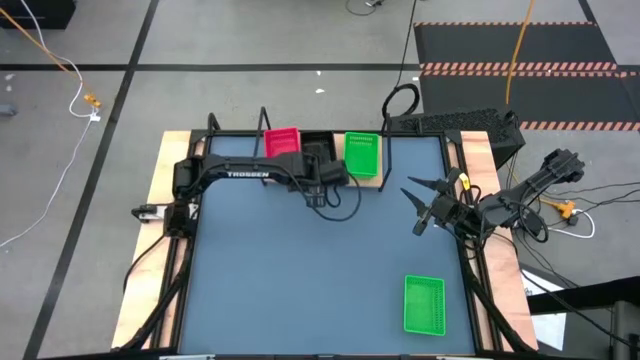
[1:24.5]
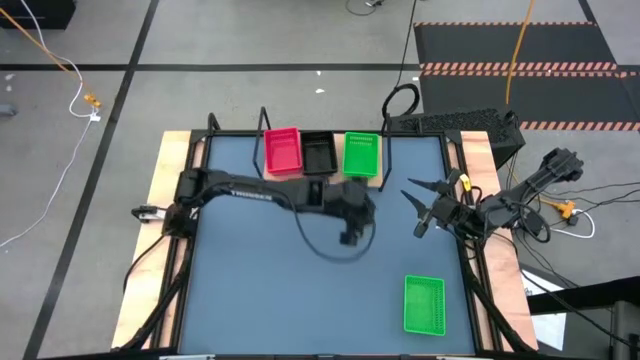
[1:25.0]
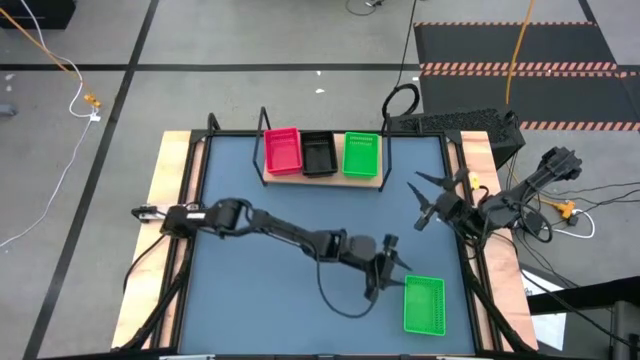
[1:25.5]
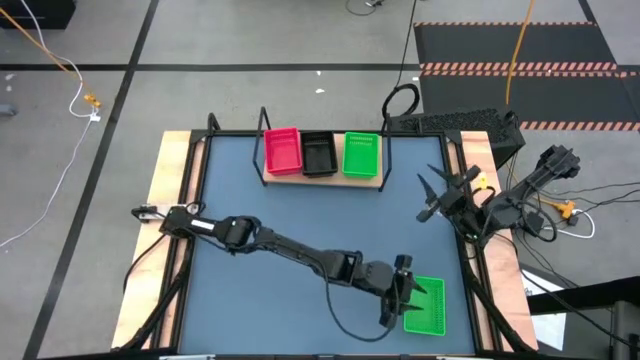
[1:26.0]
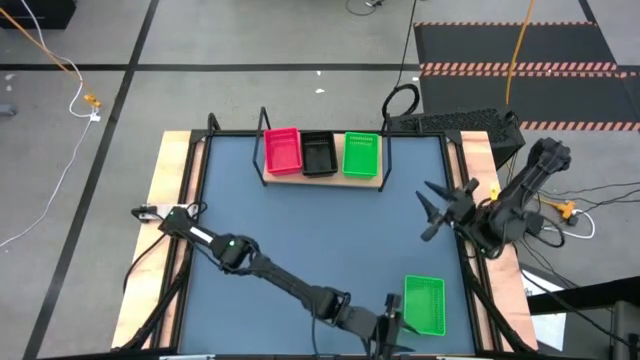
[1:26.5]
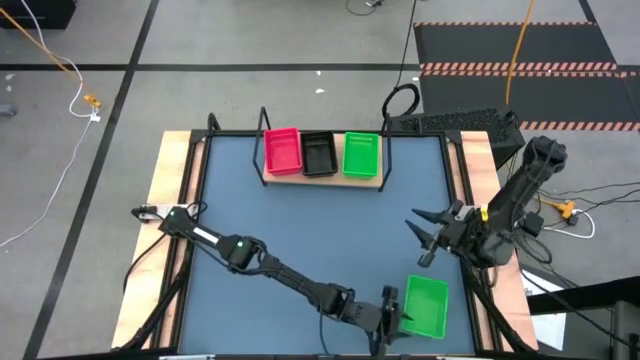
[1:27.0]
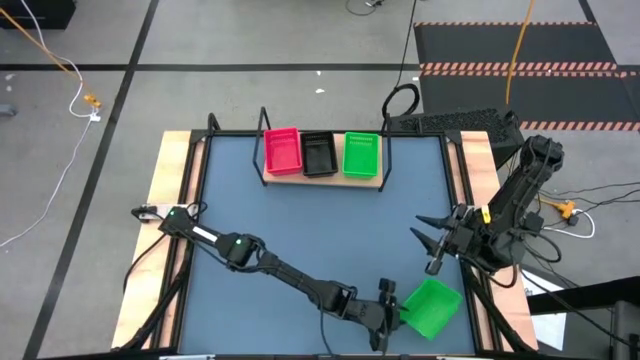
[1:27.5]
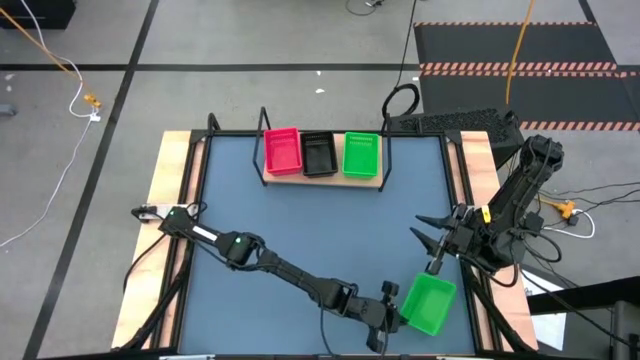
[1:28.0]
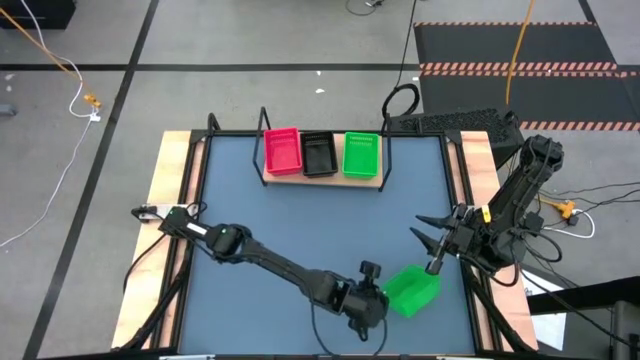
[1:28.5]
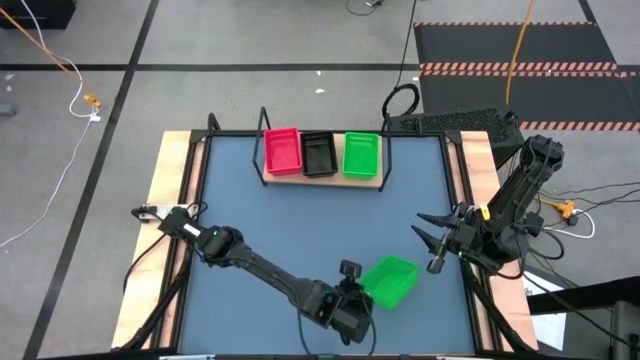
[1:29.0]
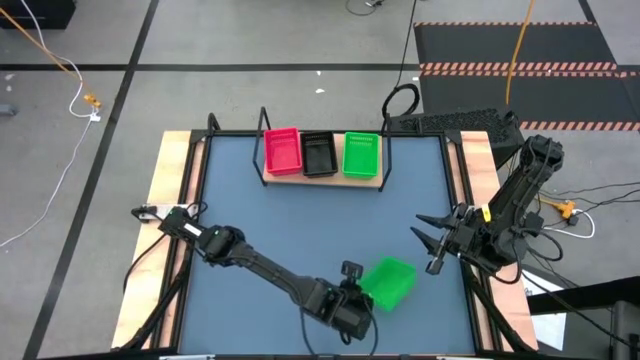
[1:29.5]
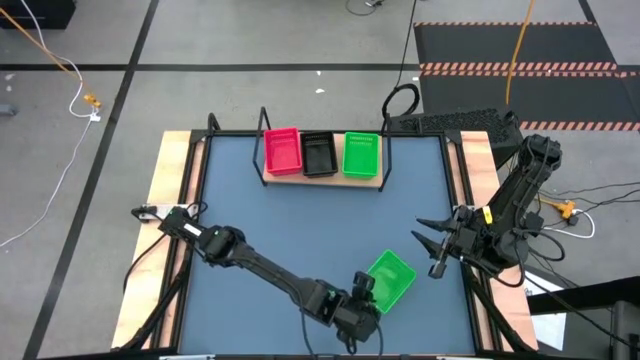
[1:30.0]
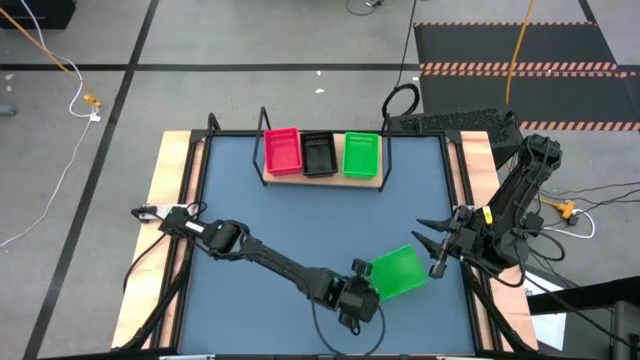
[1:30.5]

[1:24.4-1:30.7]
Task: Stack baskets on shelf by color
Stack the green basket on the stacked green baskets on the shelf

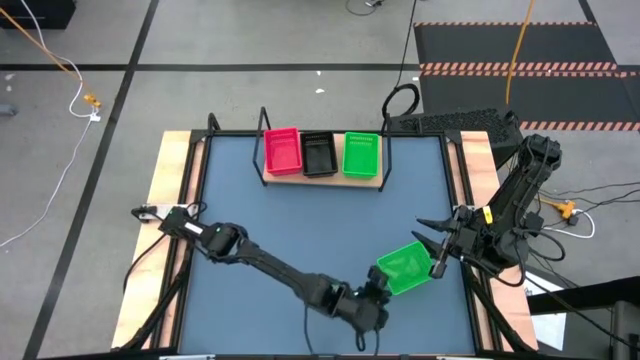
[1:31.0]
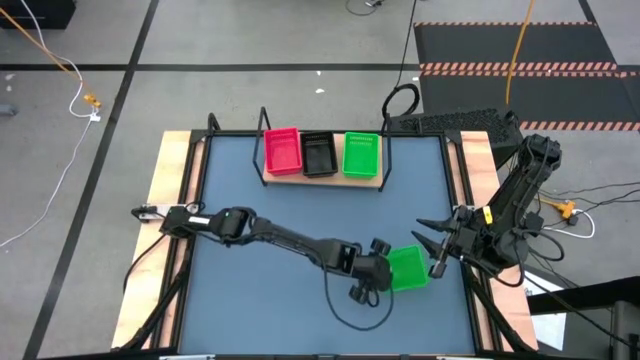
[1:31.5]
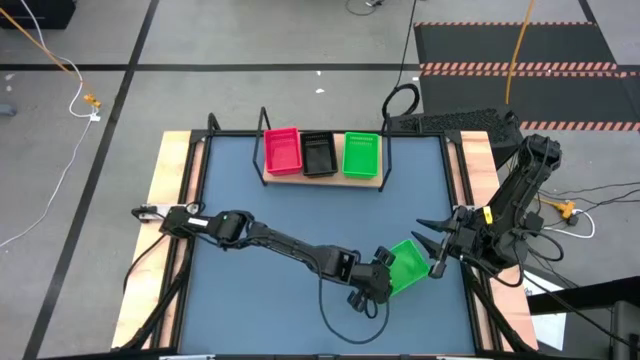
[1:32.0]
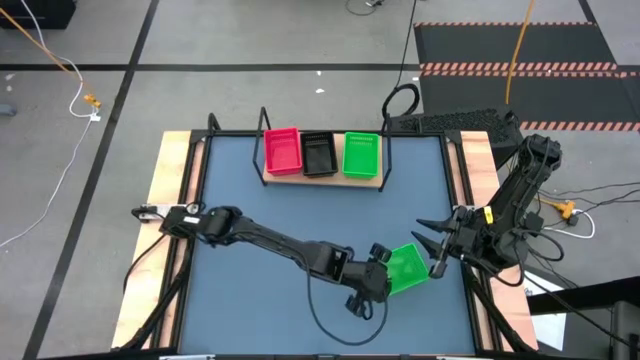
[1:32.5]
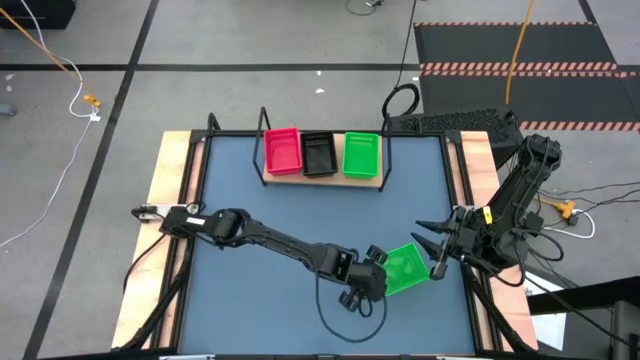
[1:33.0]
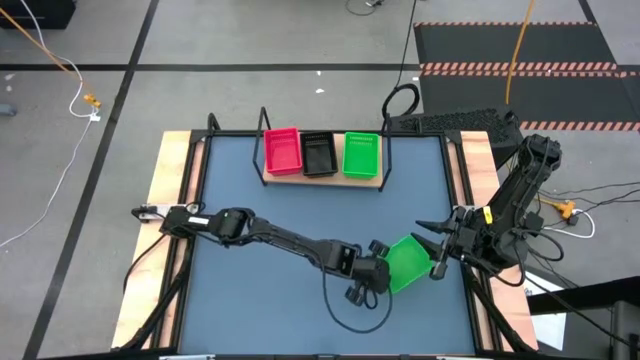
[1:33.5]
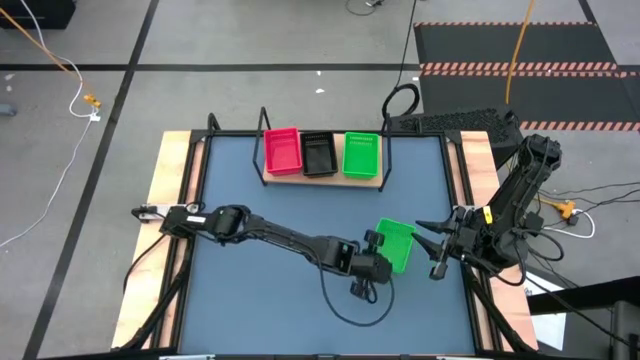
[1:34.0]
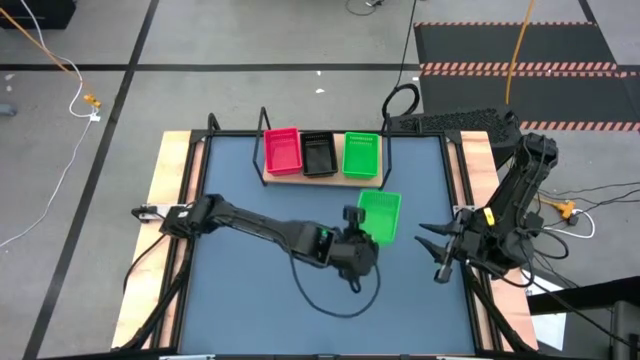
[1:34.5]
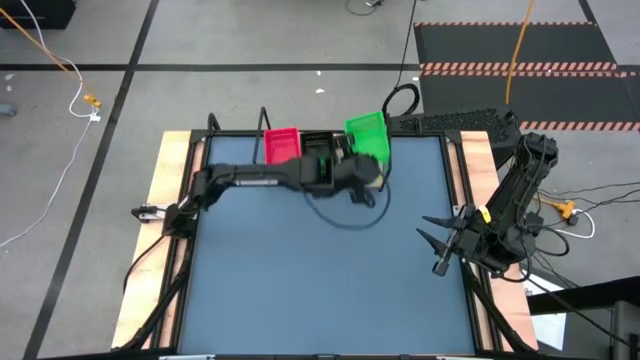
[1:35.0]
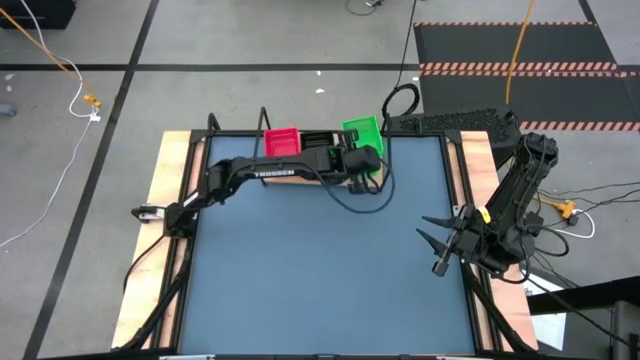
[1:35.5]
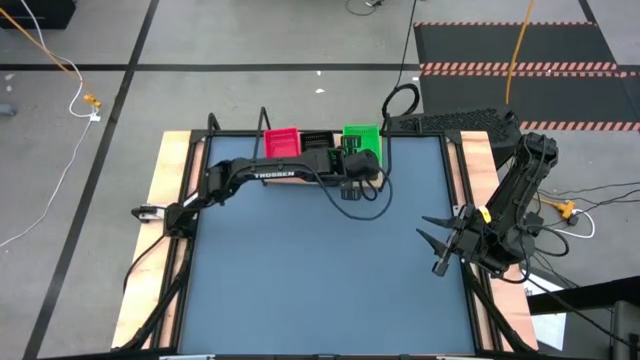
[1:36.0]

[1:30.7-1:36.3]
Stack the green basket on the stacked green baskets on the shelf

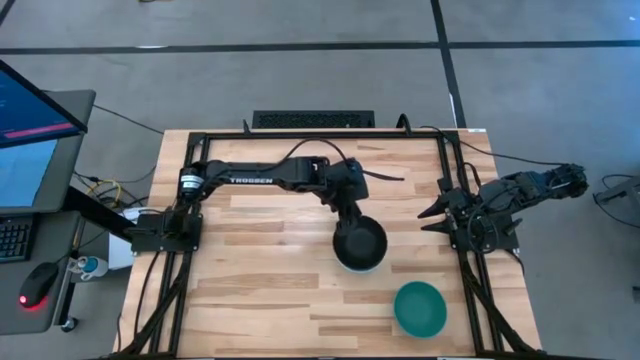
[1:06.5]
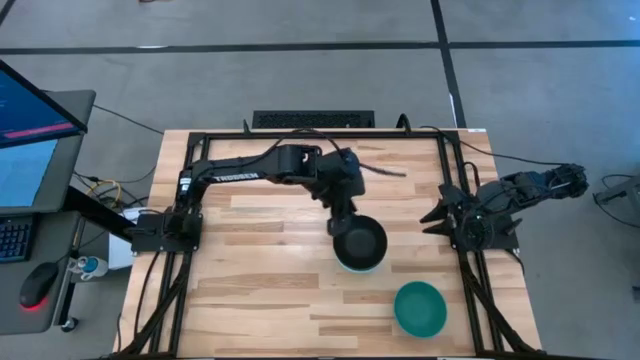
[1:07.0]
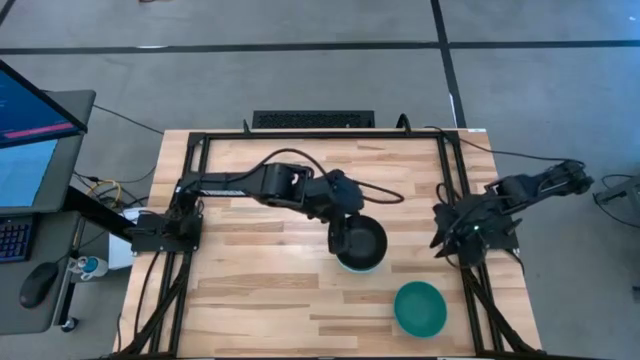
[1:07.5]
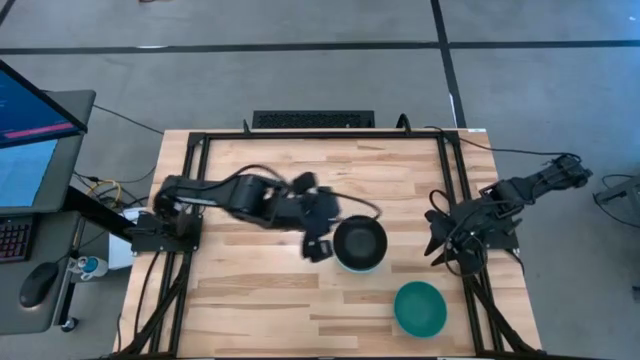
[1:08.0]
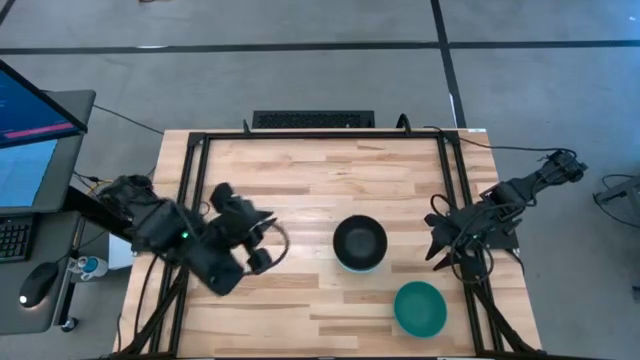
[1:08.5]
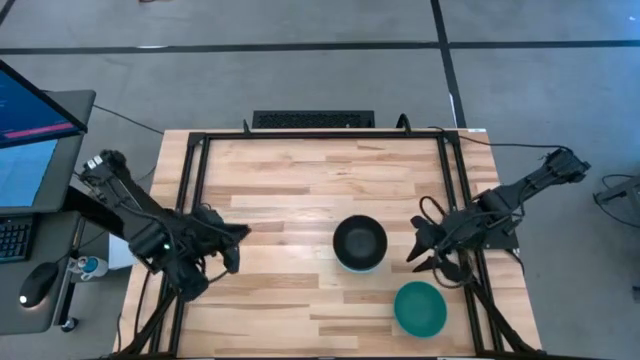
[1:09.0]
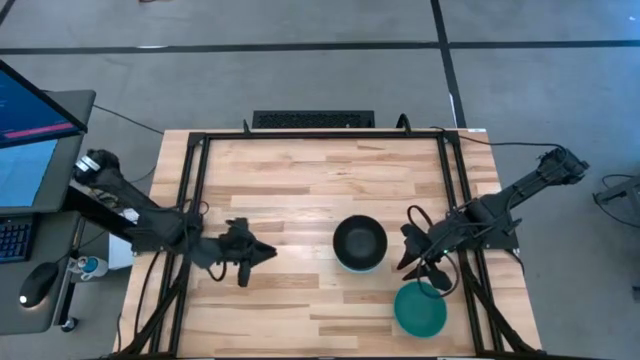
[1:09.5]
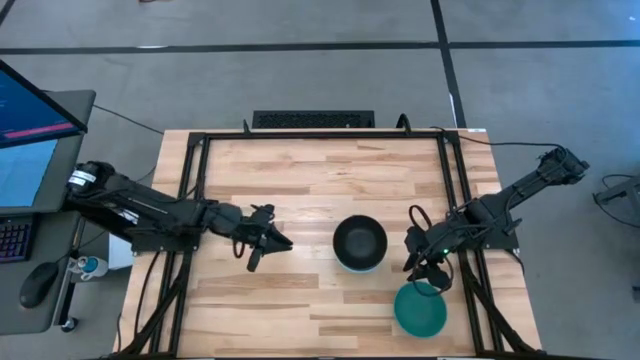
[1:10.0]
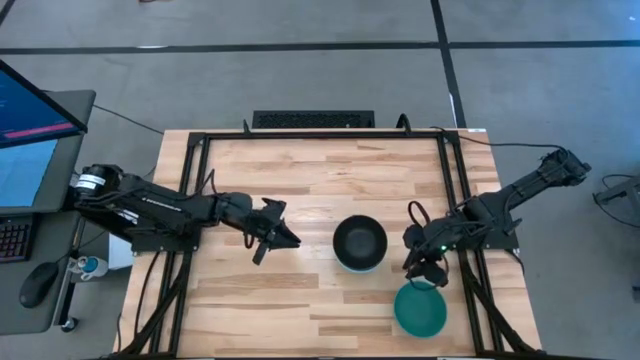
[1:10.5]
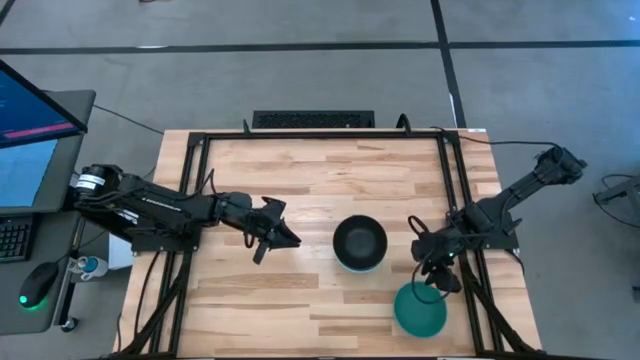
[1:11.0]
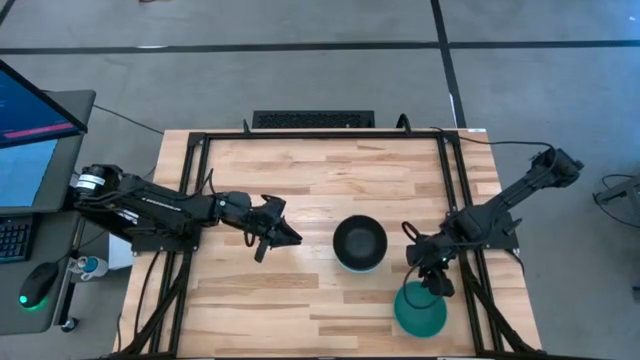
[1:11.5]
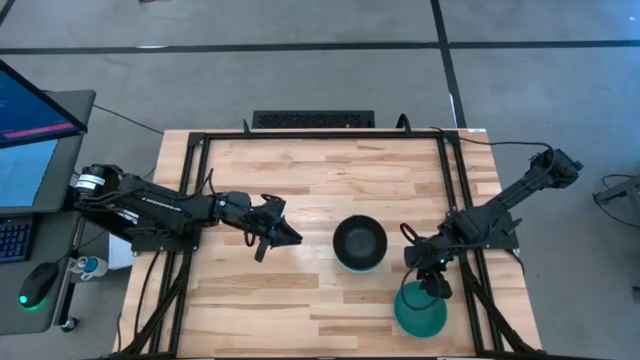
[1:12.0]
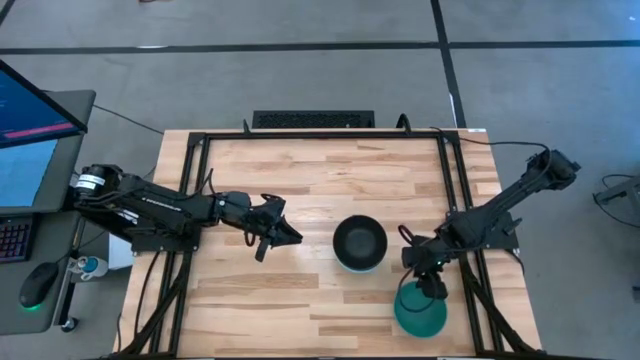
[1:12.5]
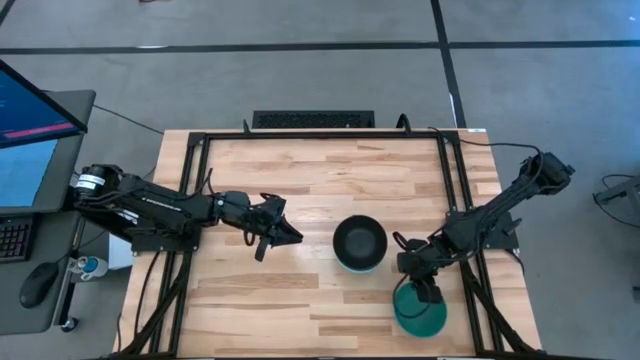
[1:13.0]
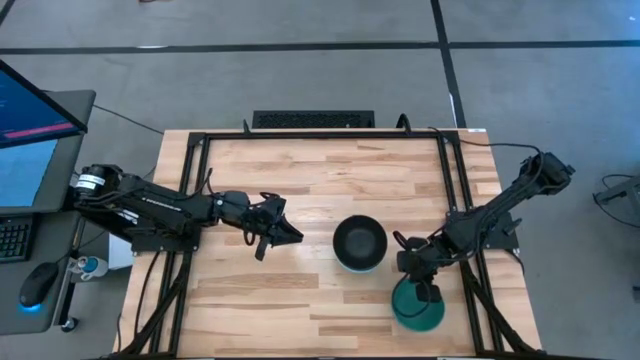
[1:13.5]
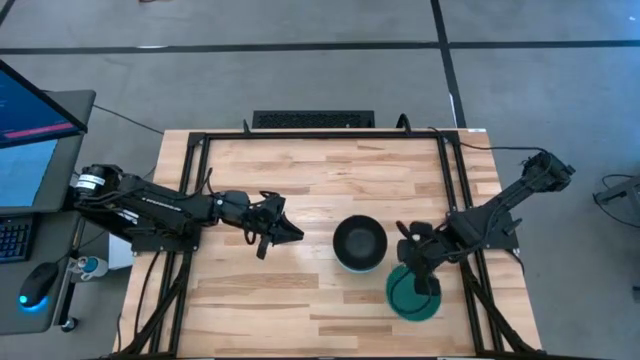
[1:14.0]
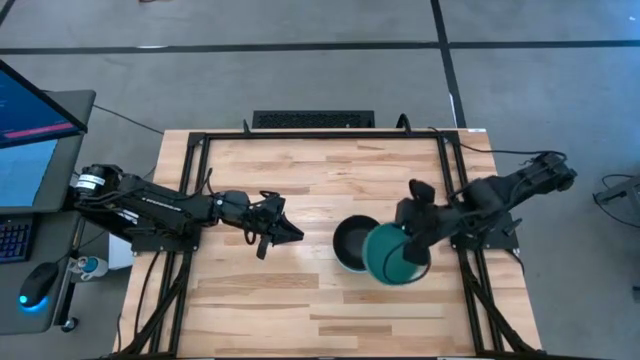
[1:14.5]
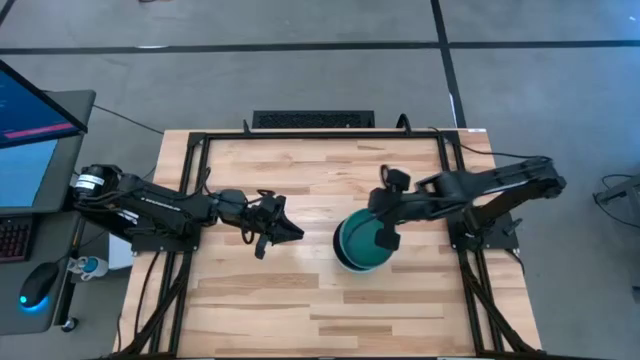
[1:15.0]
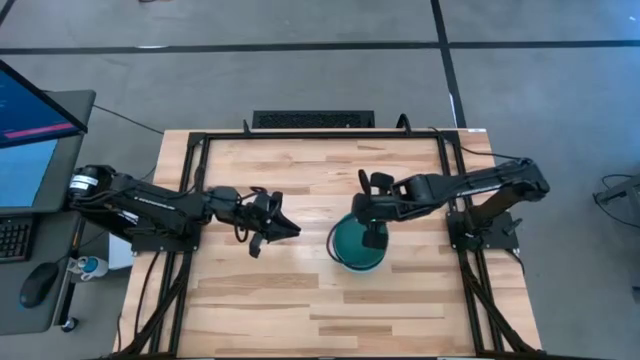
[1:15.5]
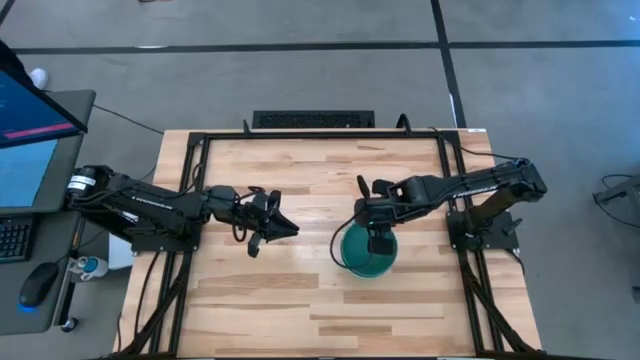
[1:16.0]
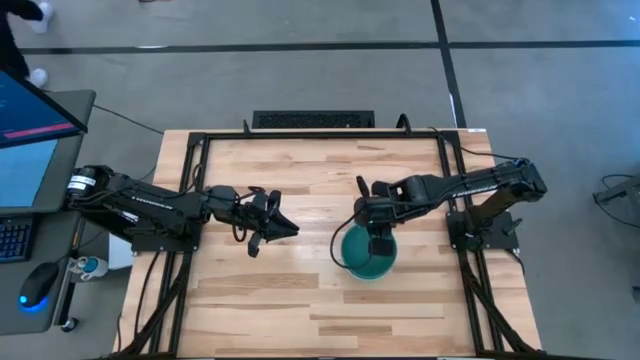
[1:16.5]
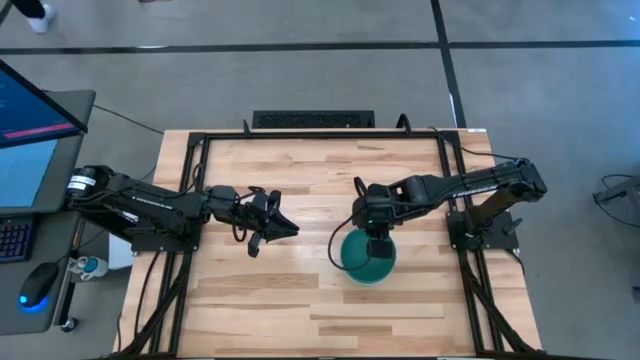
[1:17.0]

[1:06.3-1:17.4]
Task: Nest bowls inside each other
Stack the green bowl on top of the black bowl
